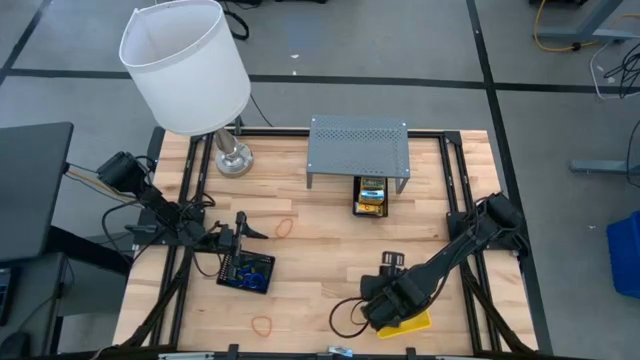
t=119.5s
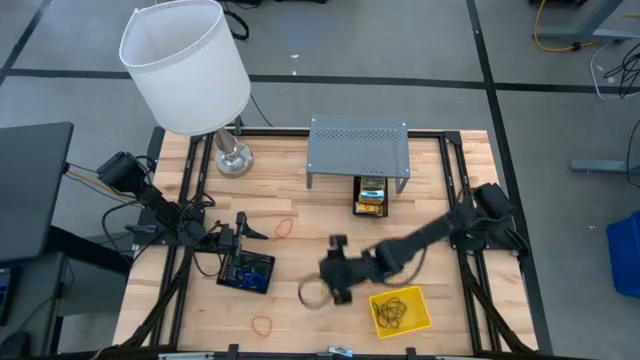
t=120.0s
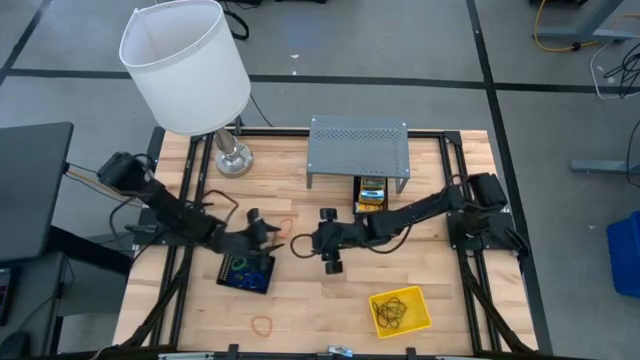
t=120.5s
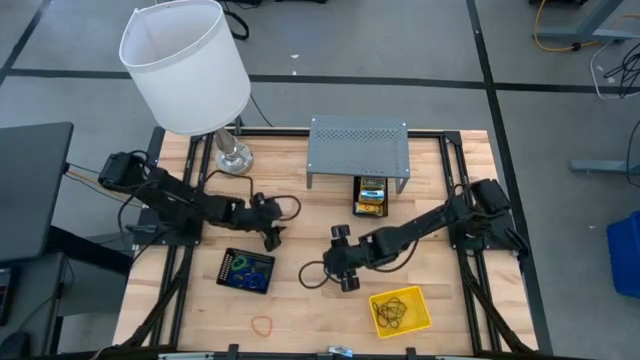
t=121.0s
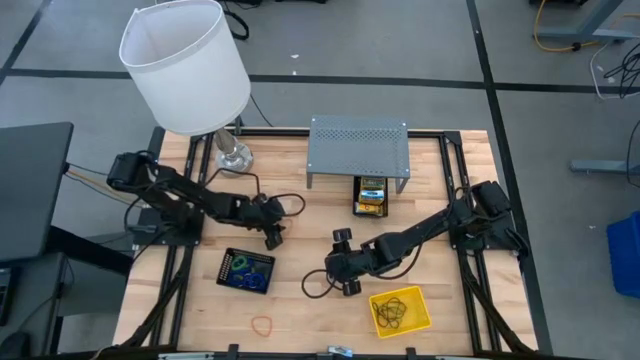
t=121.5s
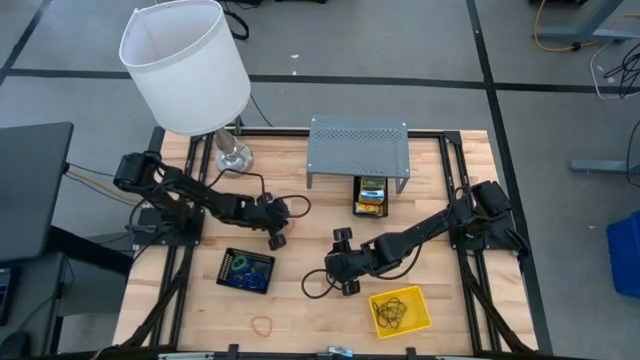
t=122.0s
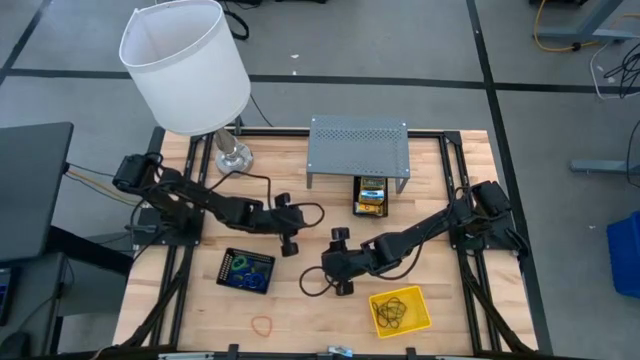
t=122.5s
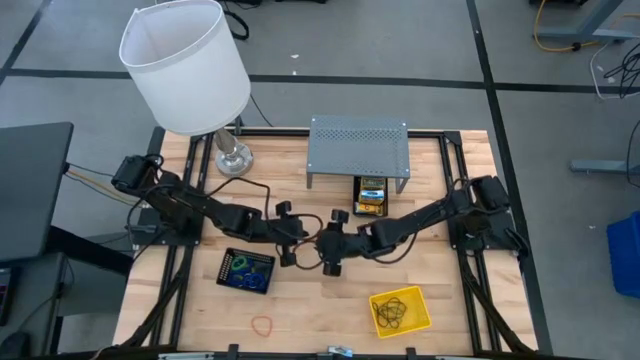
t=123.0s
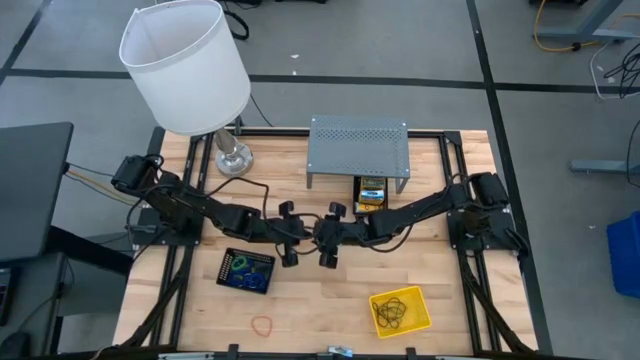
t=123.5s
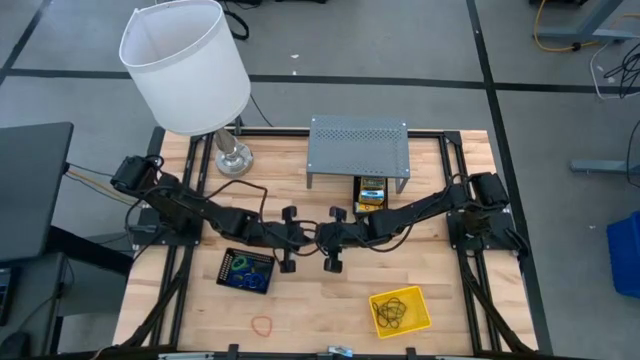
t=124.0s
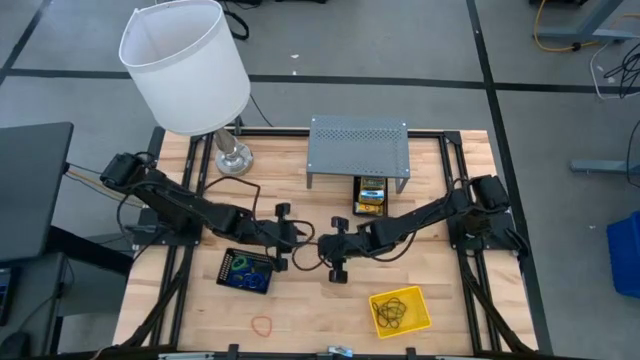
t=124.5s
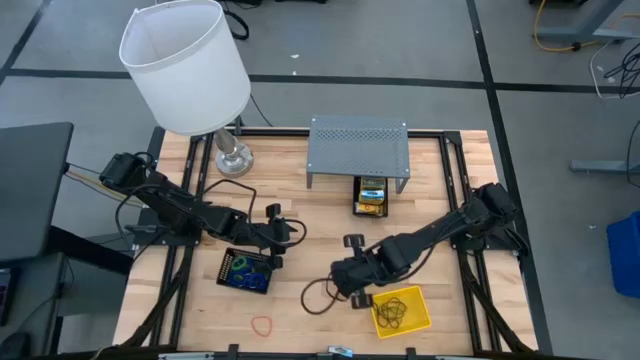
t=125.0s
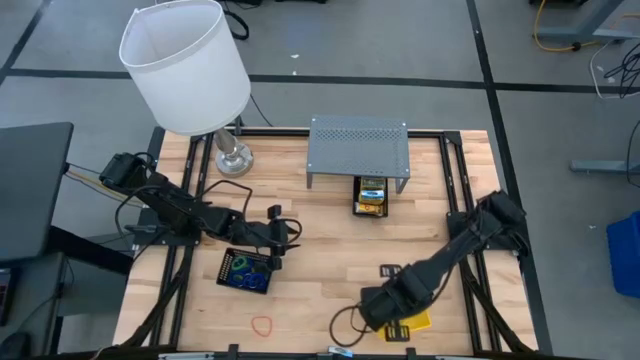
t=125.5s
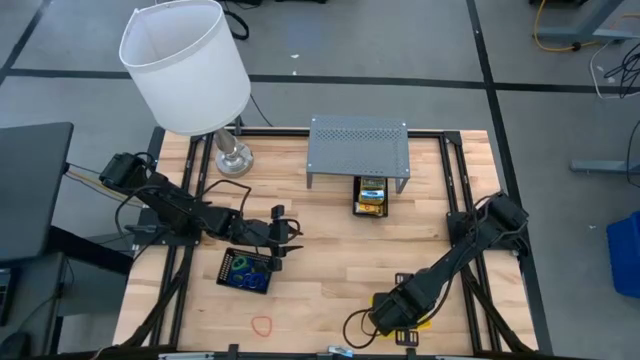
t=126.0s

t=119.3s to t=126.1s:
Task: Pick & Place Office Desk Supplies
Put the orange rubber band into the yellow bin

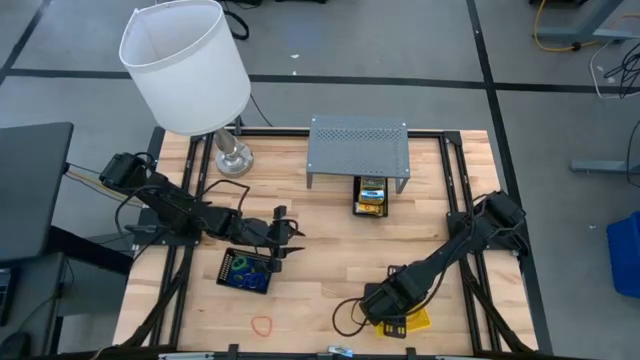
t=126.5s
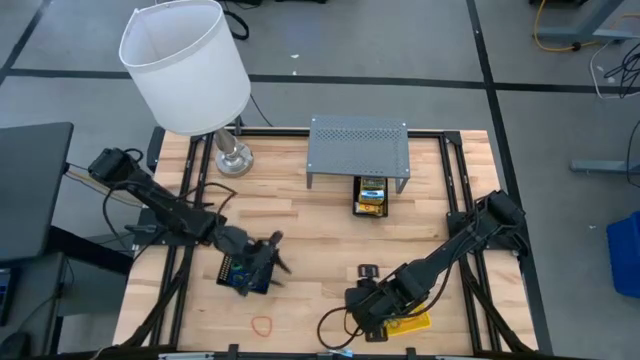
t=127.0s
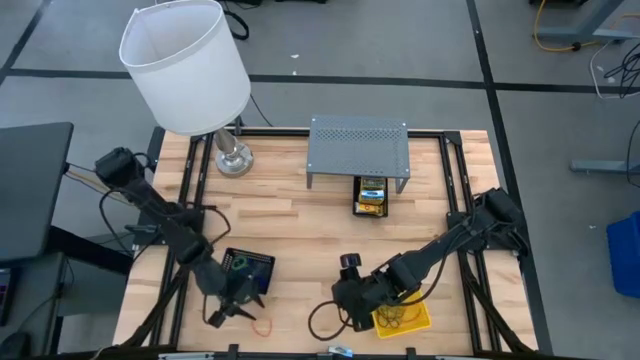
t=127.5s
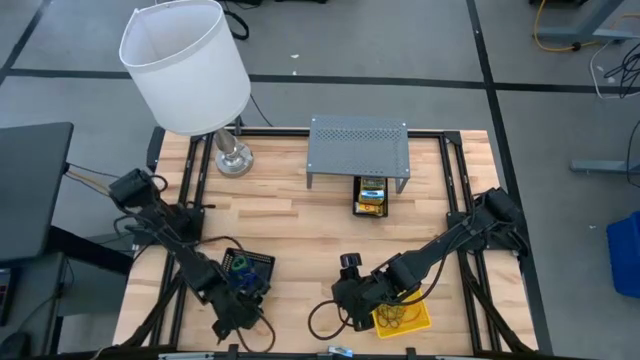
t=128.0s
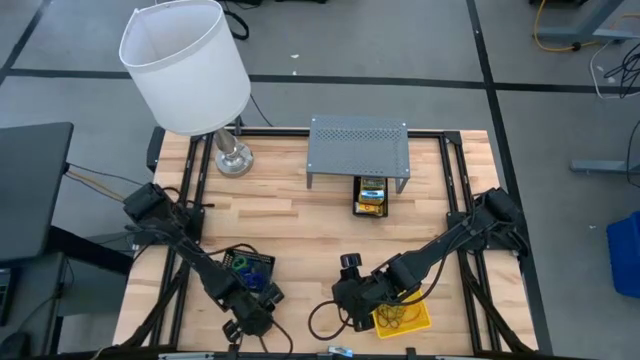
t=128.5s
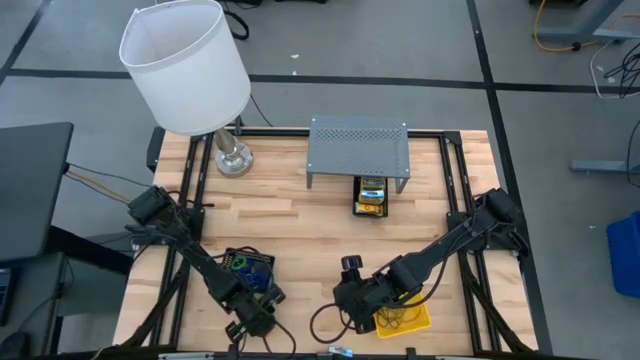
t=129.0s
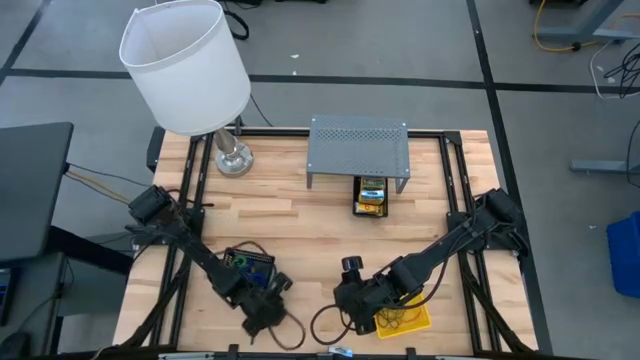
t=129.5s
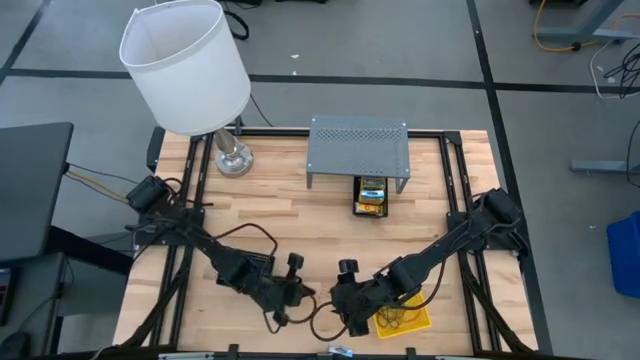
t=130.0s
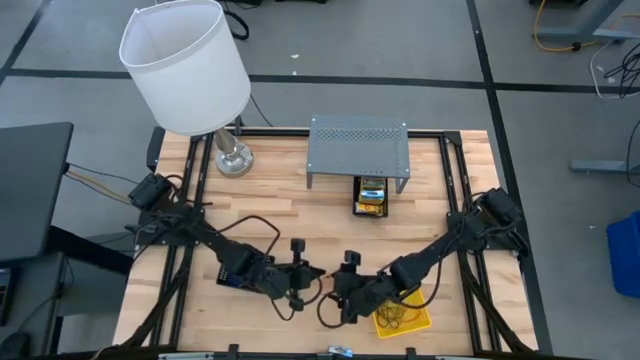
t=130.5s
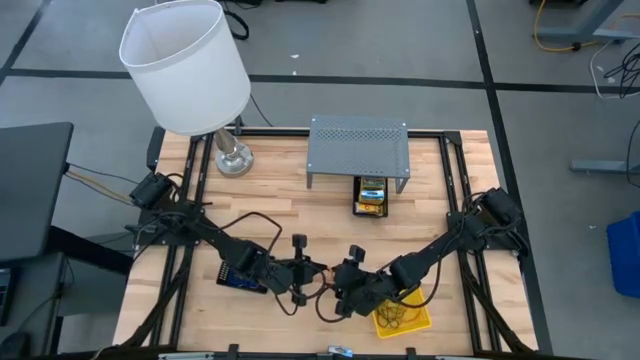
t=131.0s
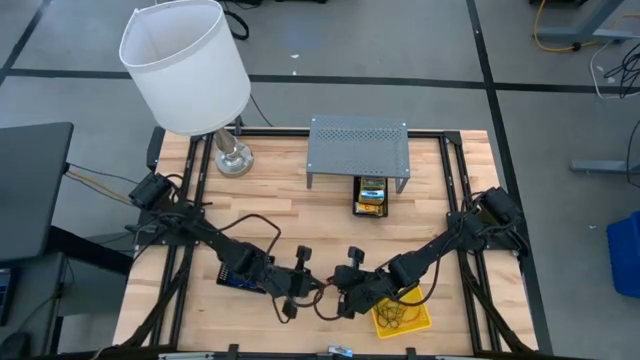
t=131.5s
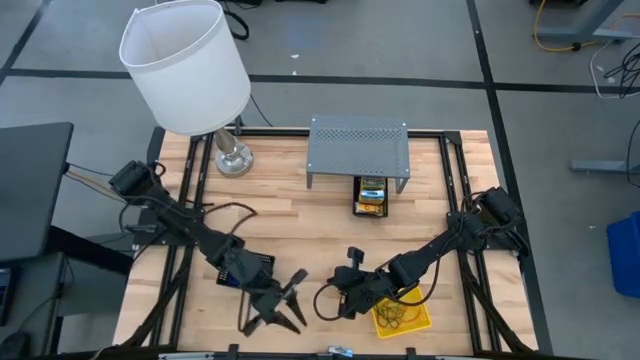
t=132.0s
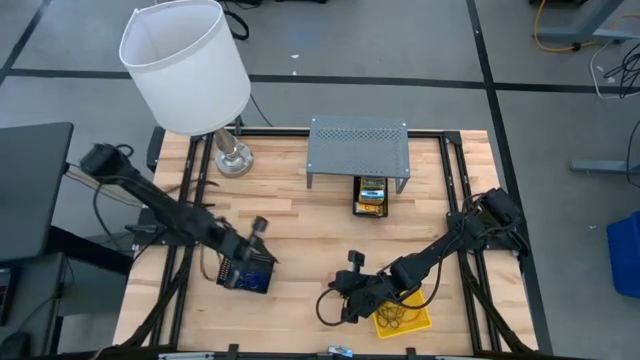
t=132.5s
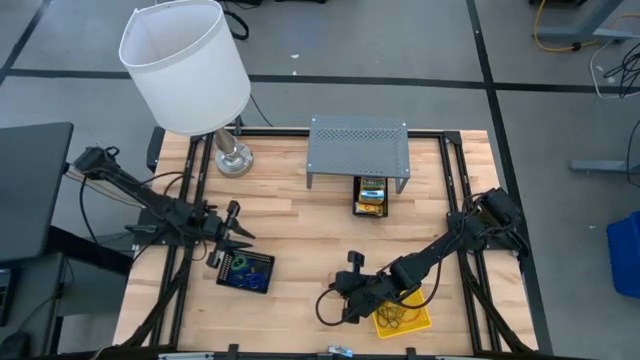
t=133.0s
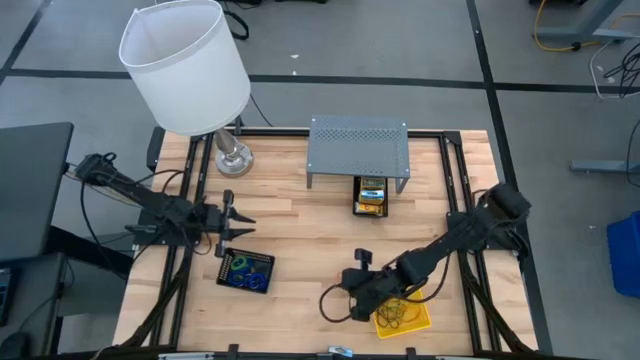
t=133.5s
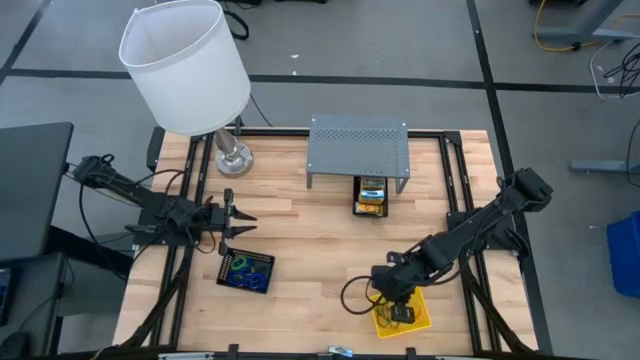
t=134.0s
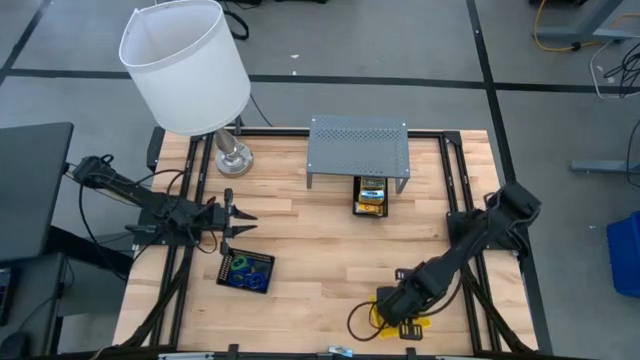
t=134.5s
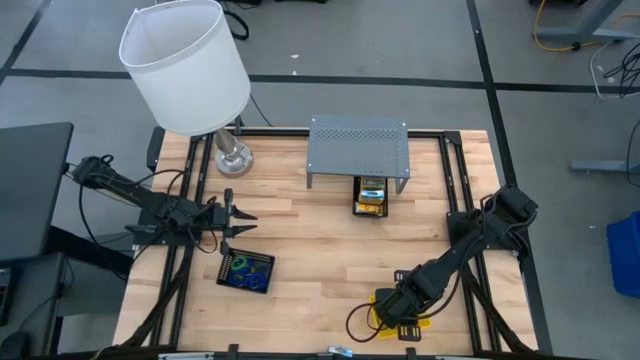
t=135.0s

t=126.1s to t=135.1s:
Put the orange rubber band into the yellow bin

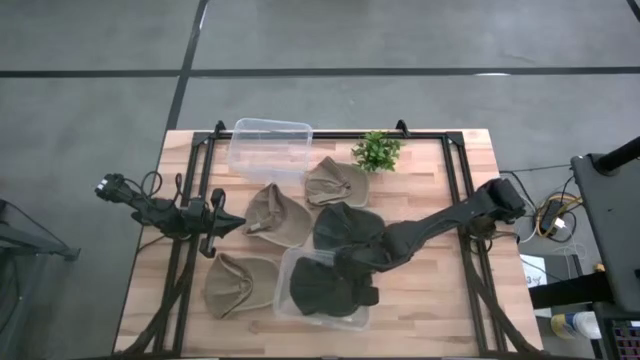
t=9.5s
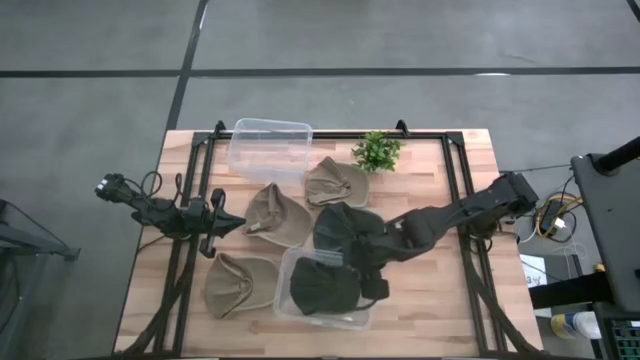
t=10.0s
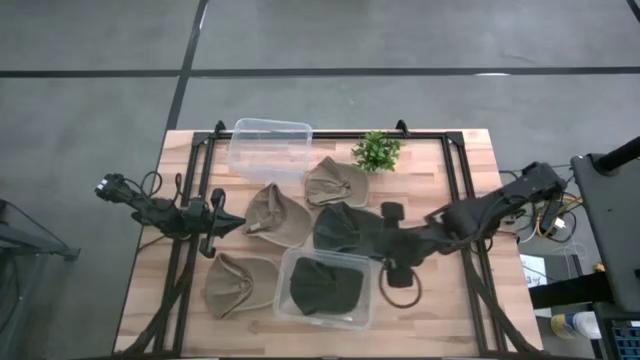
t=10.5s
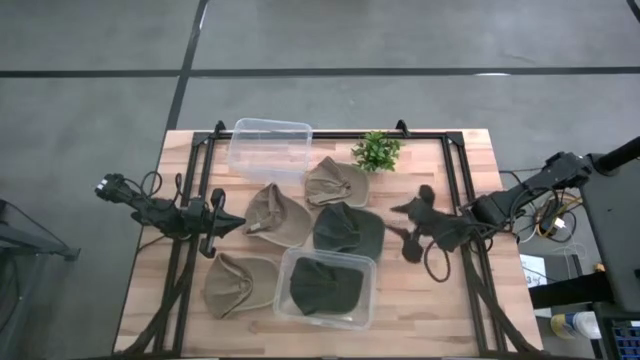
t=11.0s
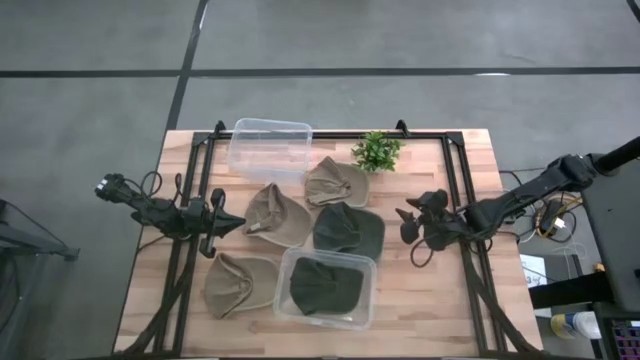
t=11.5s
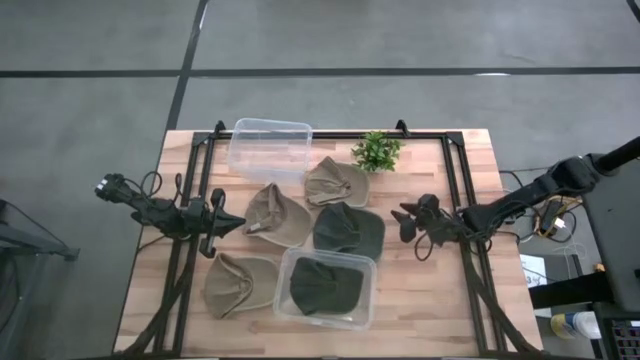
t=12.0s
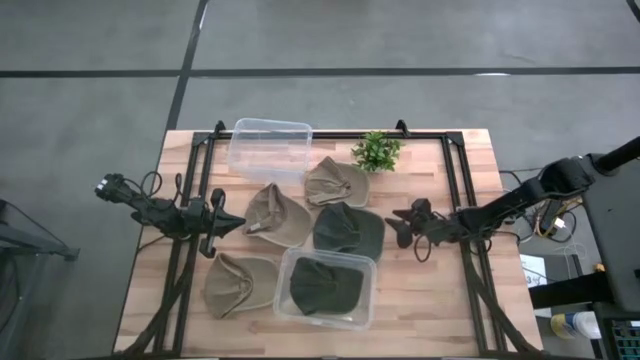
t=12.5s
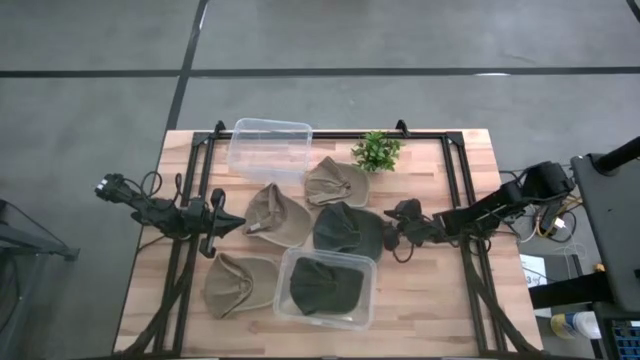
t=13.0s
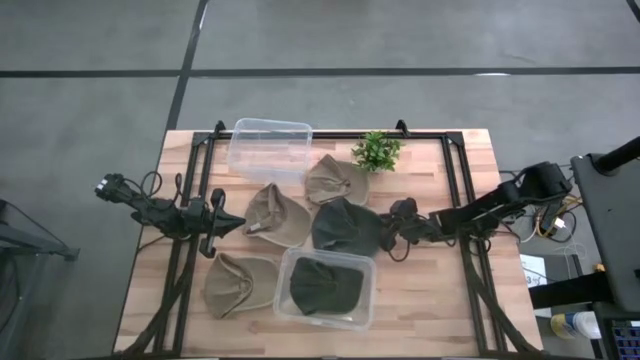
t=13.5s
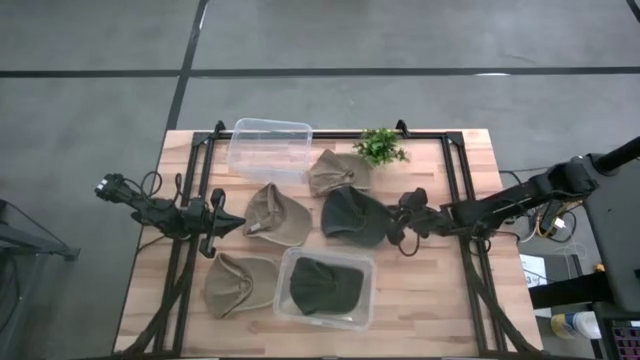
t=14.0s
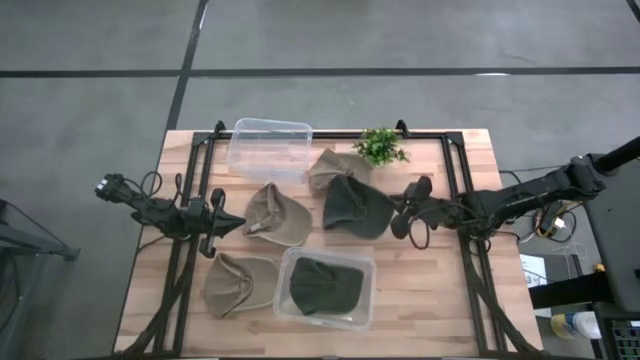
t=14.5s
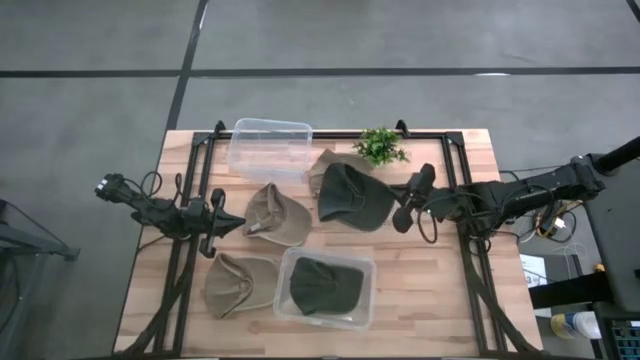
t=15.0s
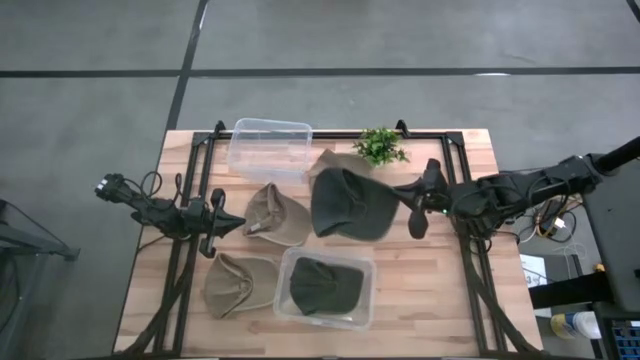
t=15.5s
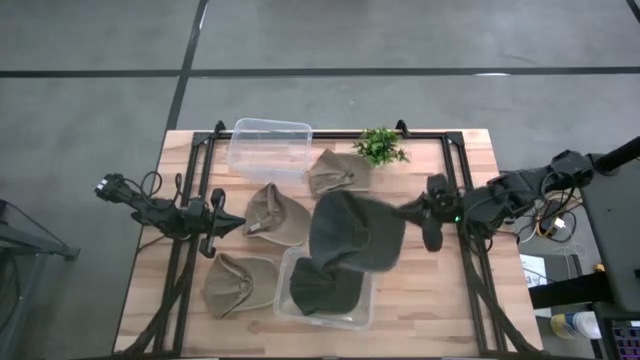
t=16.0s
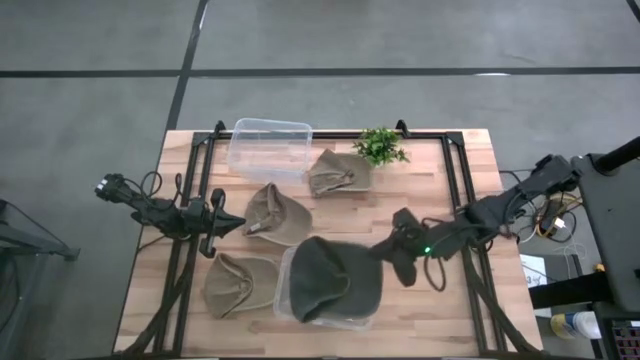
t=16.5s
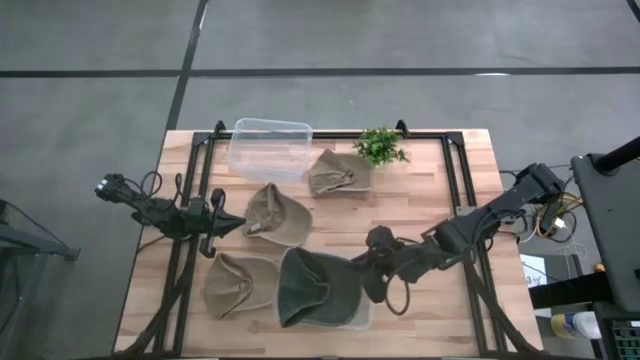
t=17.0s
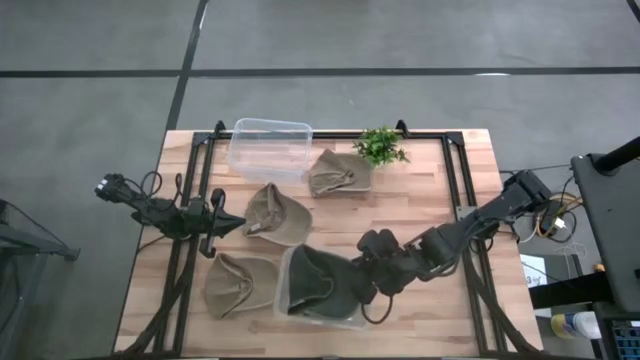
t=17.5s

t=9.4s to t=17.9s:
Task: Pick & Place hat
Put the gray cap into the bottom transparent bin
